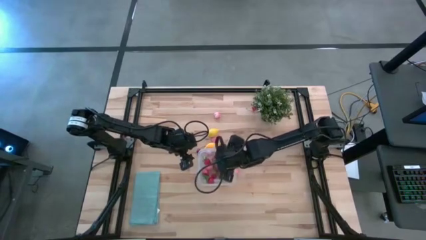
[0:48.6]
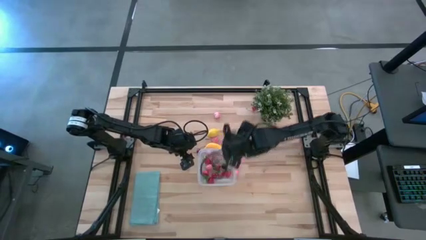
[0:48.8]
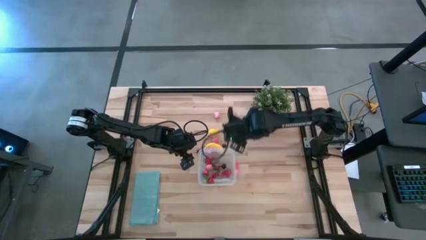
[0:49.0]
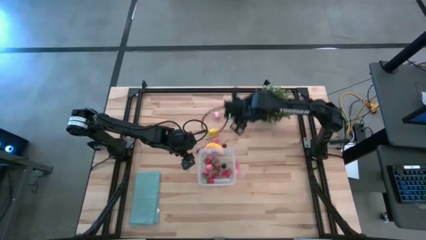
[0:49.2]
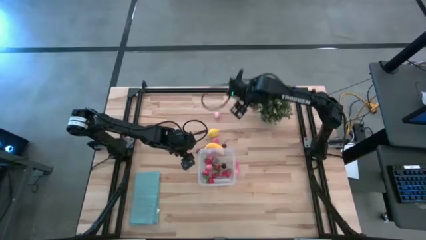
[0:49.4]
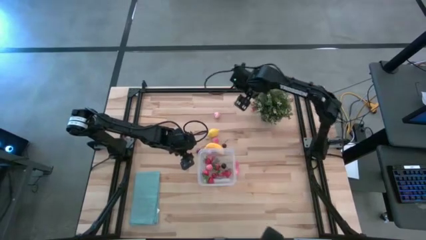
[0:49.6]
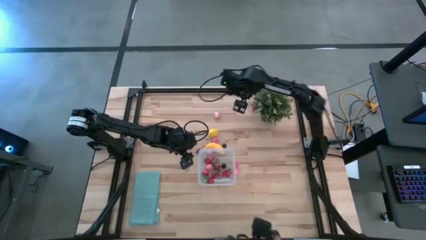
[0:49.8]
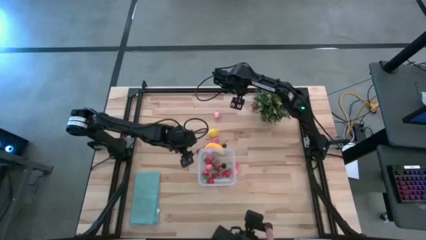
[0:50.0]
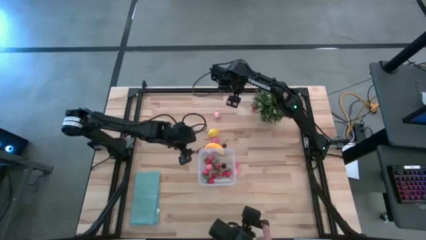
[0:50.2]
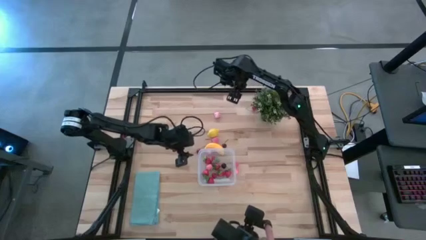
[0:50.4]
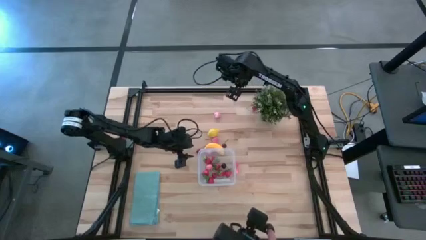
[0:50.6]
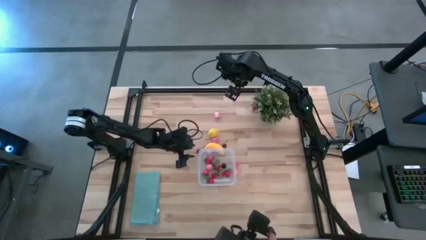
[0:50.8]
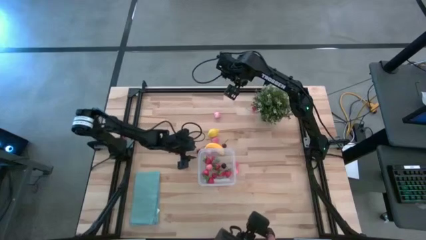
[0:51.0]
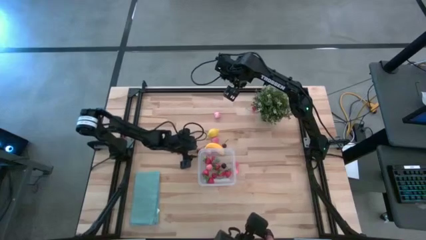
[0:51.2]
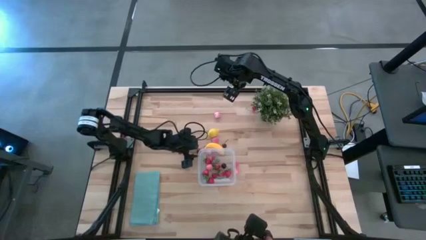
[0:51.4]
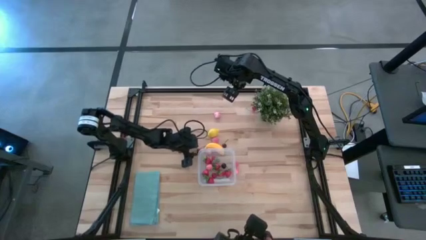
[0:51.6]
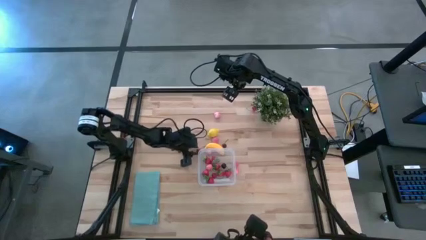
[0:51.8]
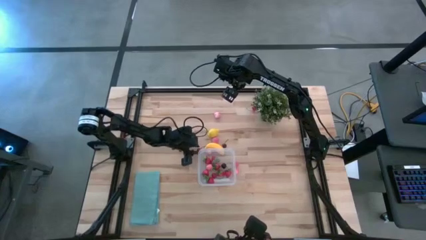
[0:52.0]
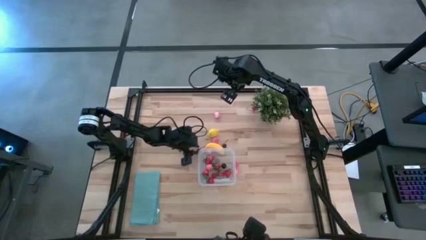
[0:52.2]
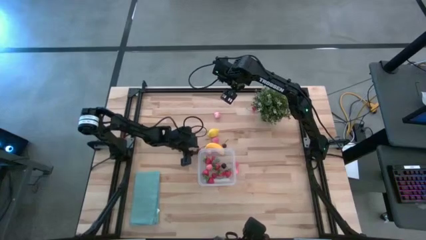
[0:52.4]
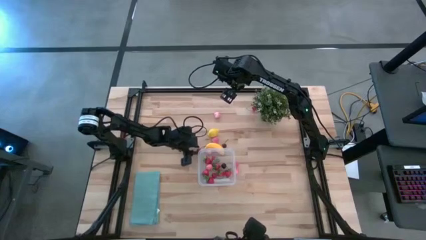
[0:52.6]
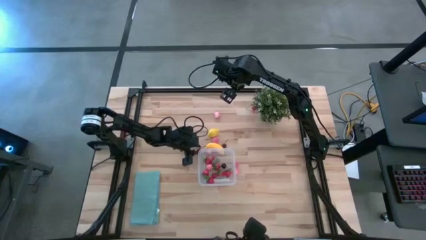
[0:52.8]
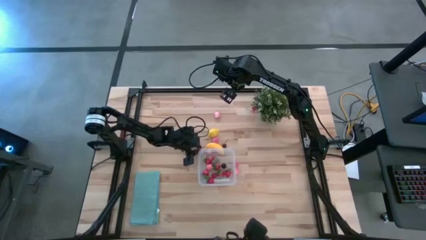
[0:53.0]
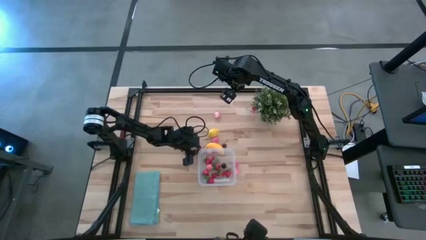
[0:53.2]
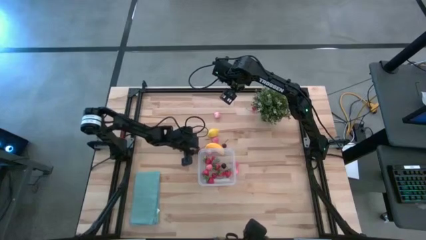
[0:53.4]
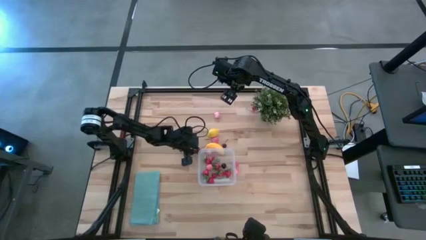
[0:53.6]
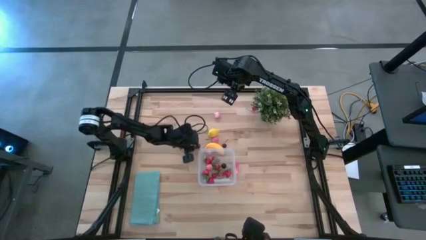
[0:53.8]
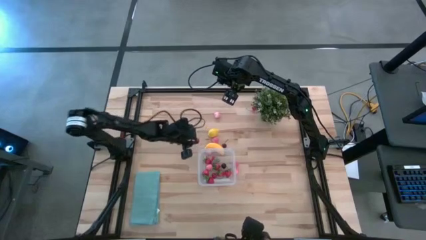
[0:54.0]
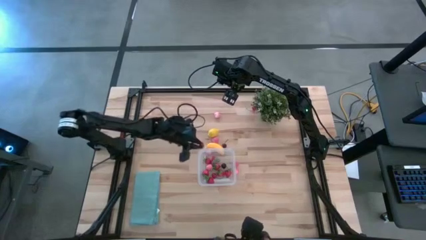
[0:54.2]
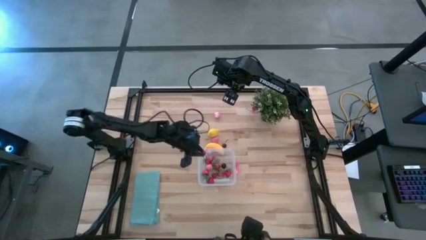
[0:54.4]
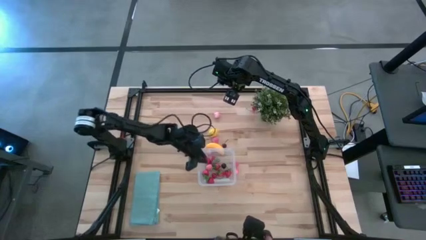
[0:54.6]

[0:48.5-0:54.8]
Task: Pick and placing Produce into tupperware
Put the red cherry into the transparent bin

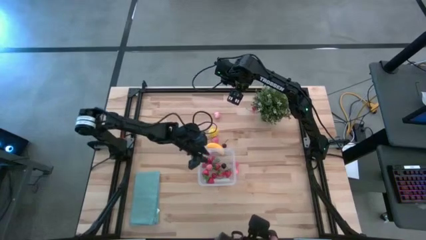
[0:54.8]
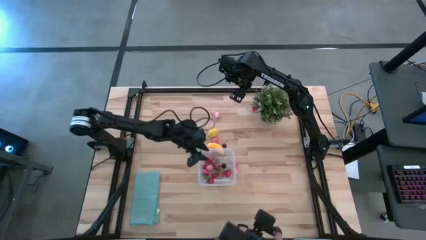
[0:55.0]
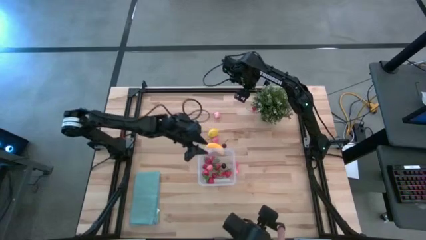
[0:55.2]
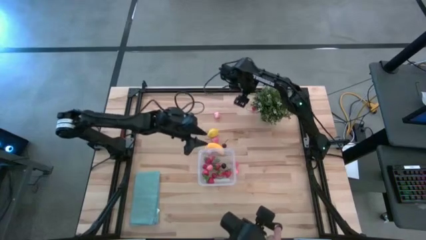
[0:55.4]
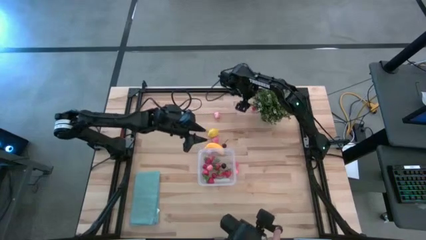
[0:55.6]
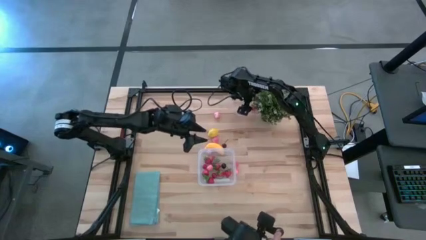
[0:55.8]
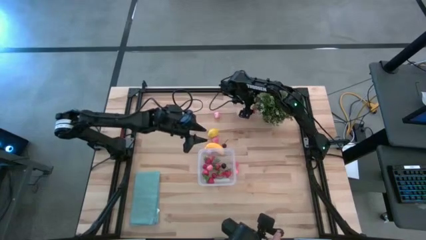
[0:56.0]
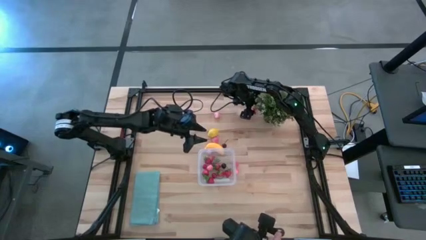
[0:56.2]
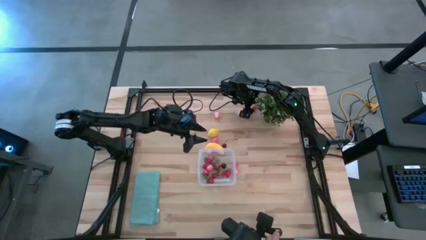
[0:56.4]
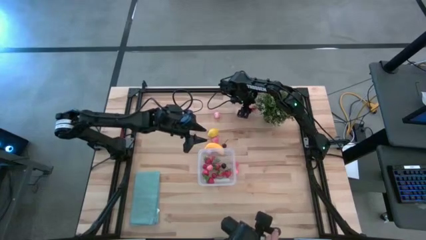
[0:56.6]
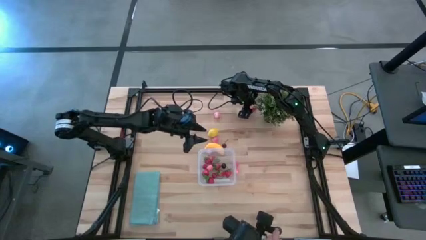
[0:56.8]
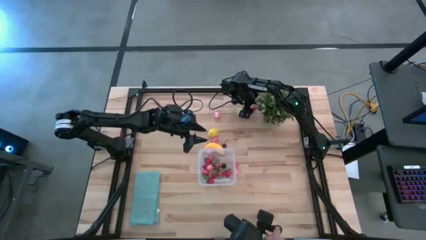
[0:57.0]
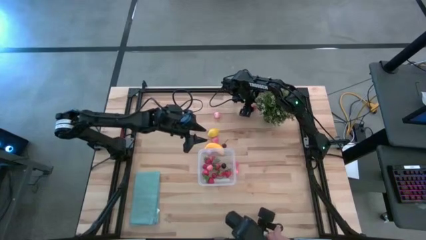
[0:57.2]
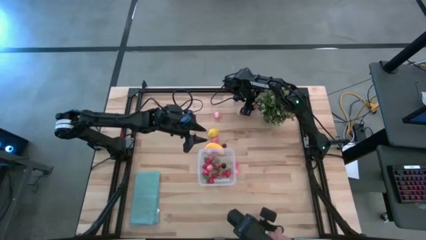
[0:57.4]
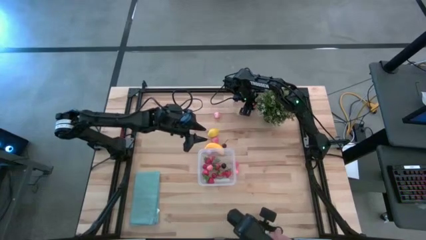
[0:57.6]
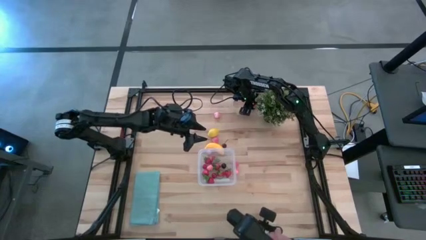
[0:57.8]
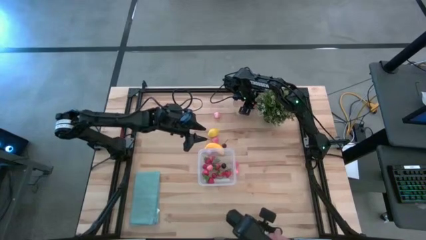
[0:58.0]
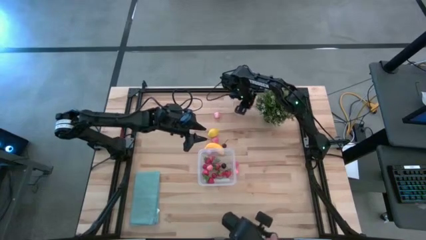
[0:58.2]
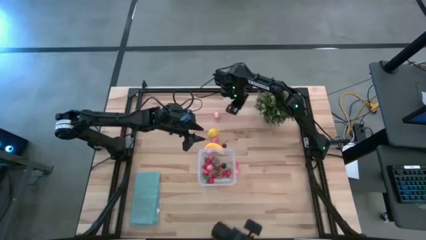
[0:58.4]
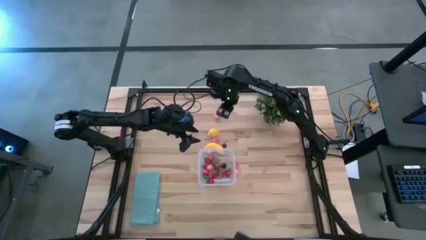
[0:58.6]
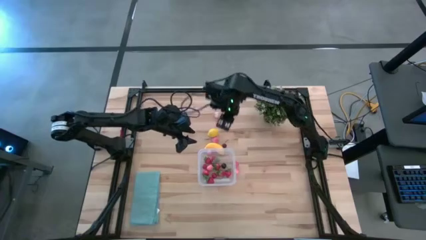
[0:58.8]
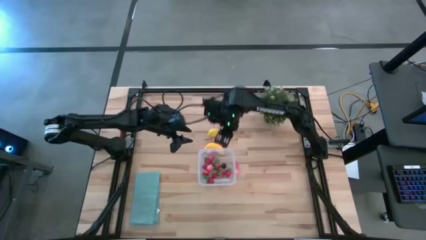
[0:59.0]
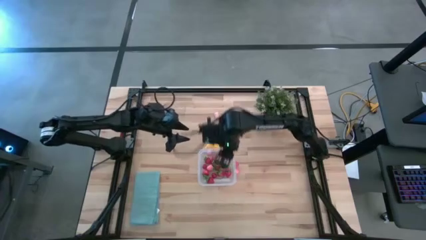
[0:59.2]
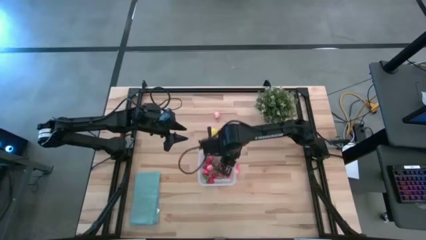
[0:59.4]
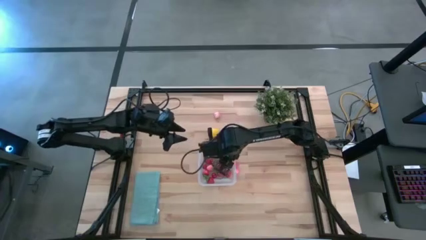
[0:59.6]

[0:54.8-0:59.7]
Put the red cherry into the transparent bin

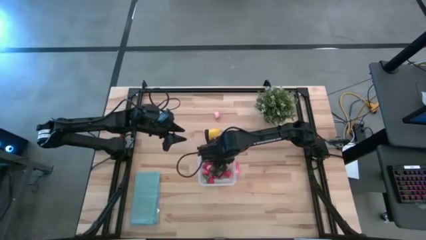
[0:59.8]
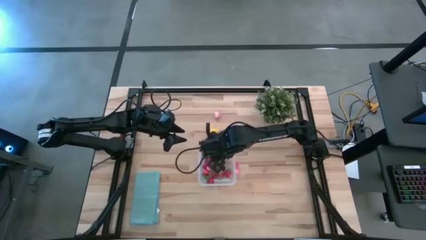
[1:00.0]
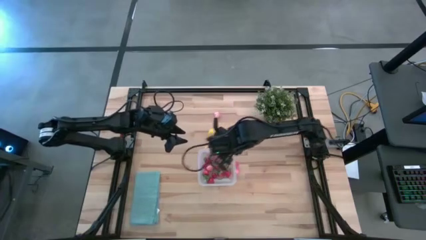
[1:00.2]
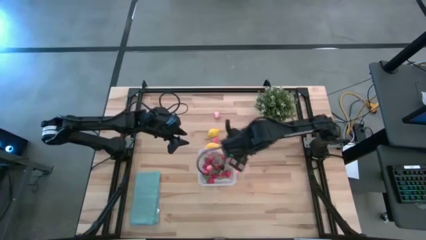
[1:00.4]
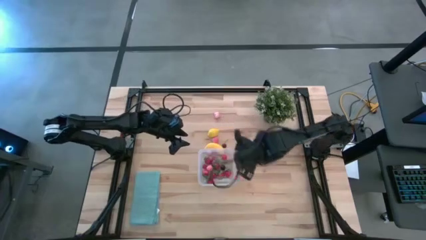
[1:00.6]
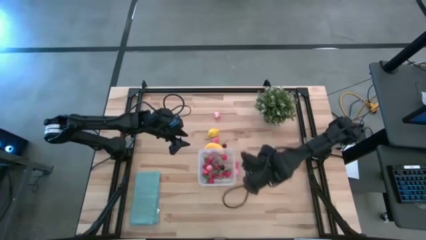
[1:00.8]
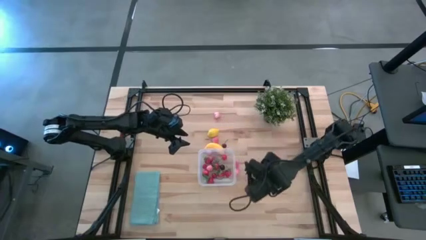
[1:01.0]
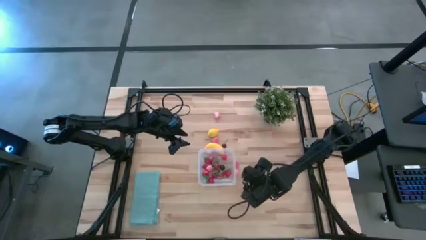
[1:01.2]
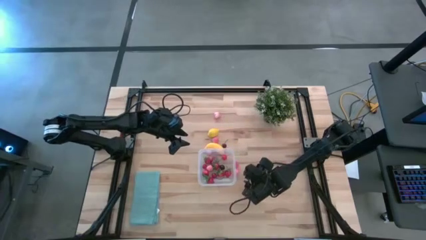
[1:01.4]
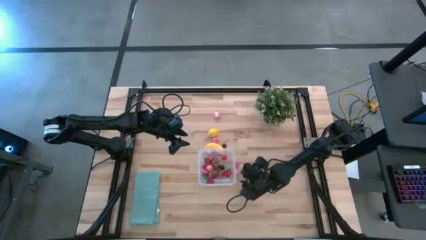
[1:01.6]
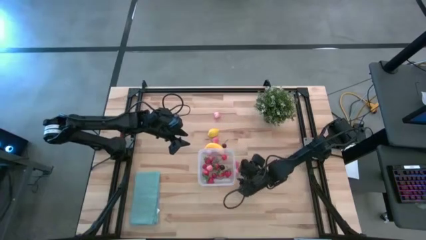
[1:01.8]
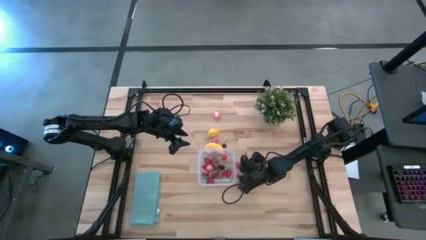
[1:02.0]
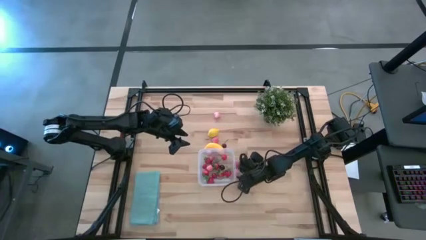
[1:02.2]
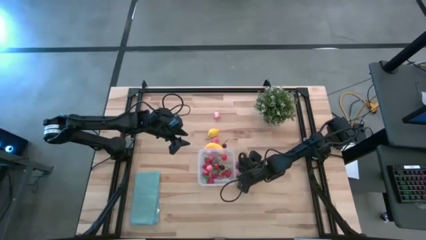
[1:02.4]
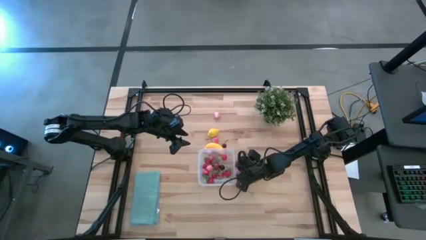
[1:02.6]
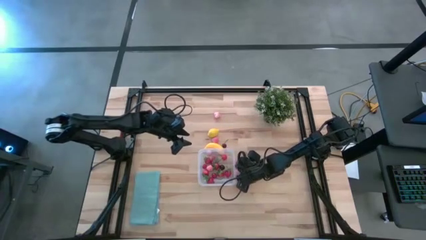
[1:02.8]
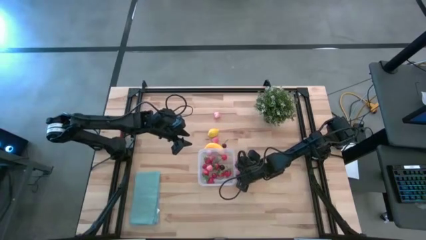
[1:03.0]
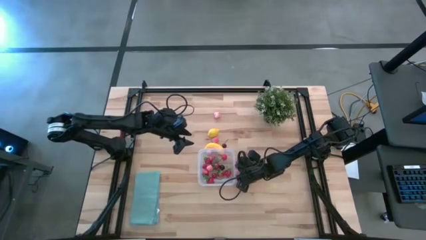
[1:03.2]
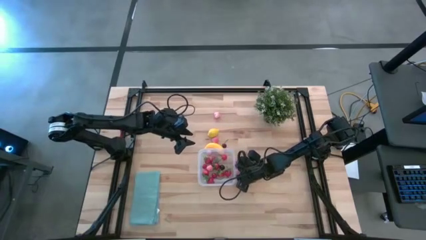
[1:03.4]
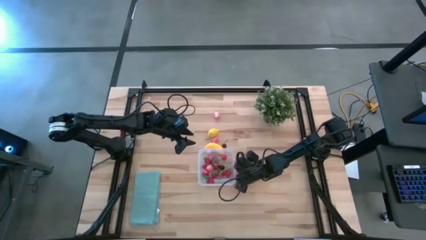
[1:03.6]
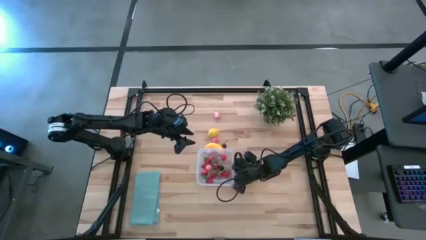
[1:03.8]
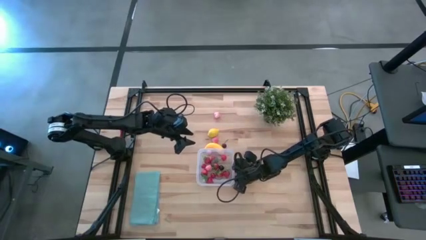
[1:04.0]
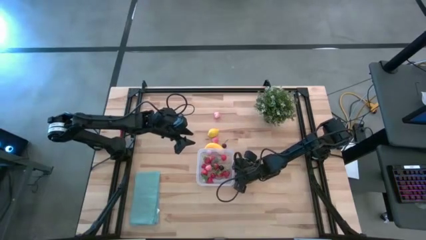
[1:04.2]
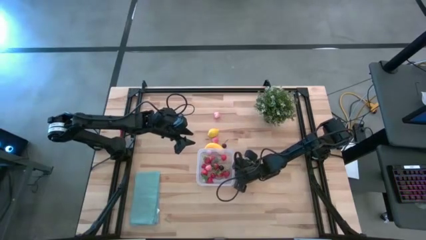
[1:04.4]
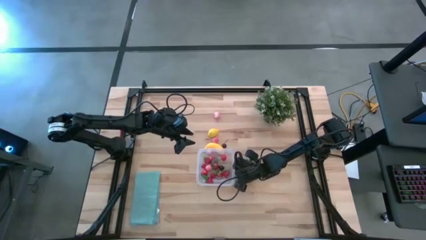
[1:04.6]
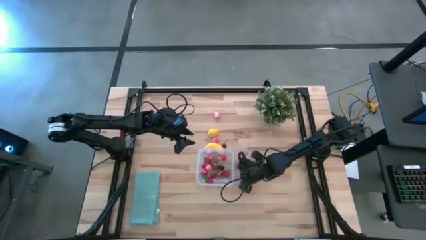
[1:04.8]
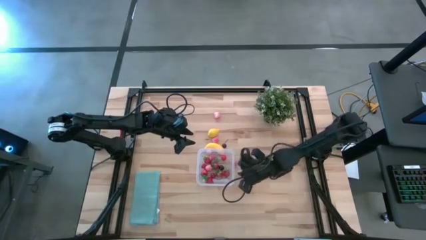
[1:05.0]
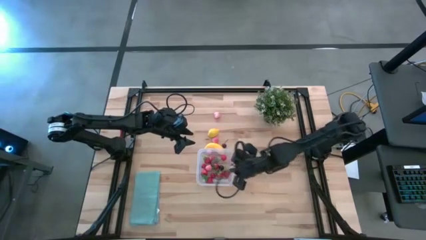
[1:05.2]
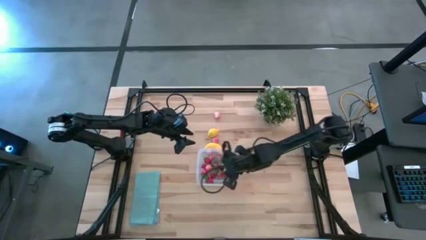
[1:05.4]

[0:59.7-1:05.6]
Put the pink peach into the transparent bin
